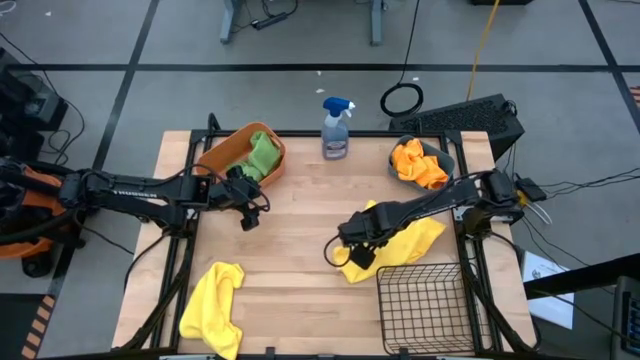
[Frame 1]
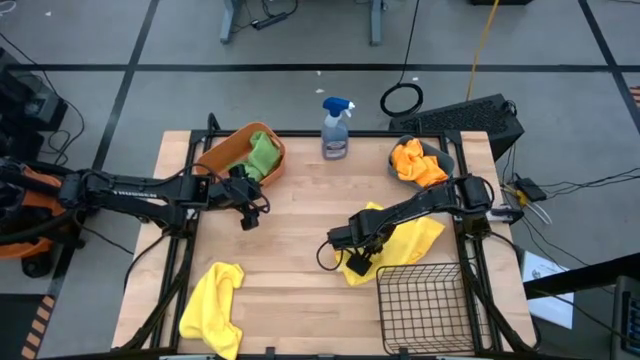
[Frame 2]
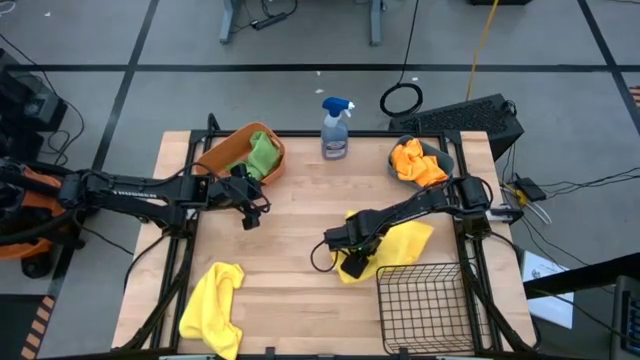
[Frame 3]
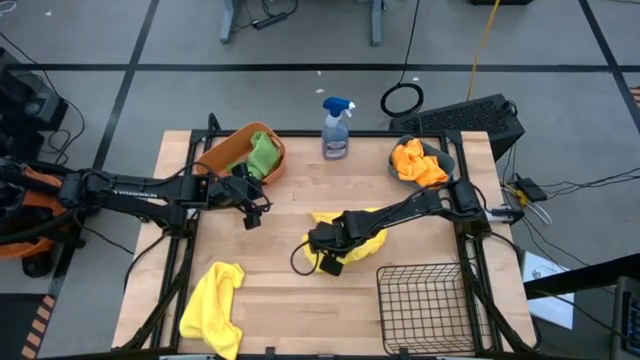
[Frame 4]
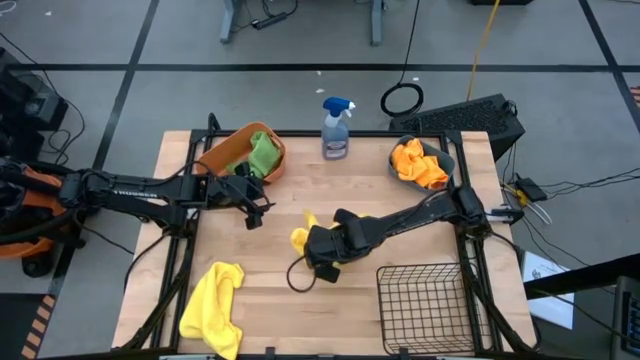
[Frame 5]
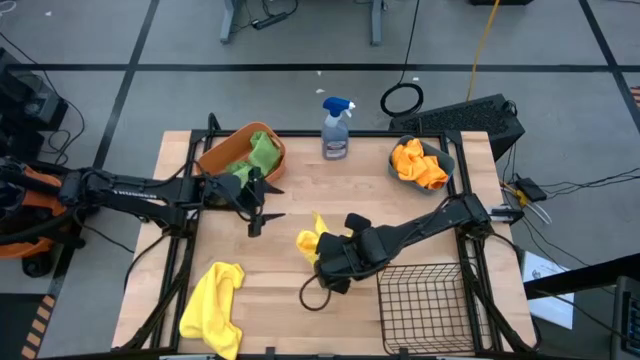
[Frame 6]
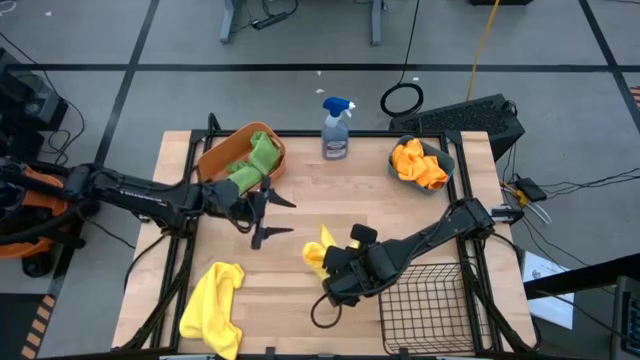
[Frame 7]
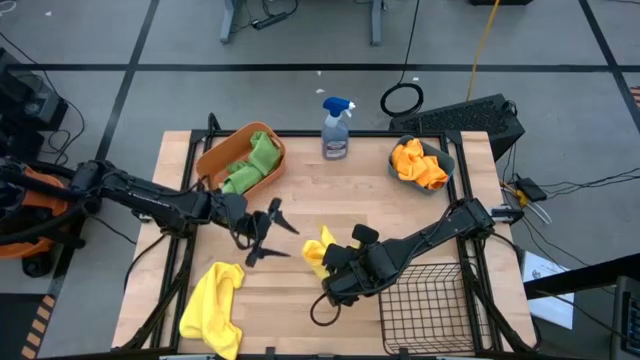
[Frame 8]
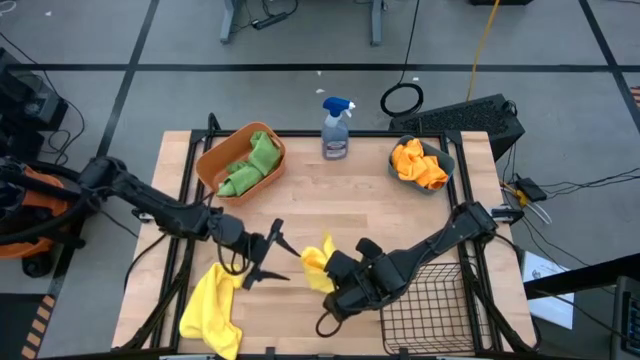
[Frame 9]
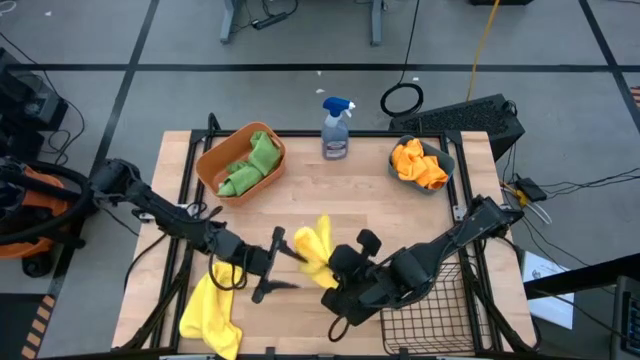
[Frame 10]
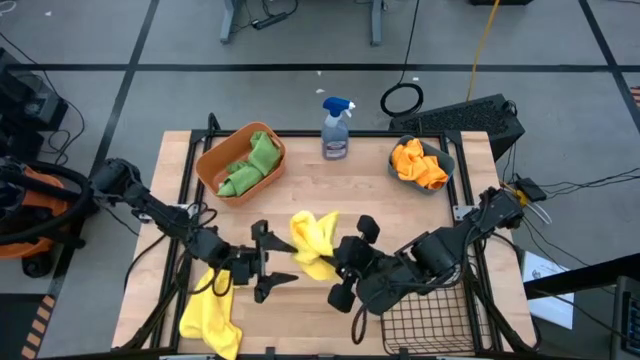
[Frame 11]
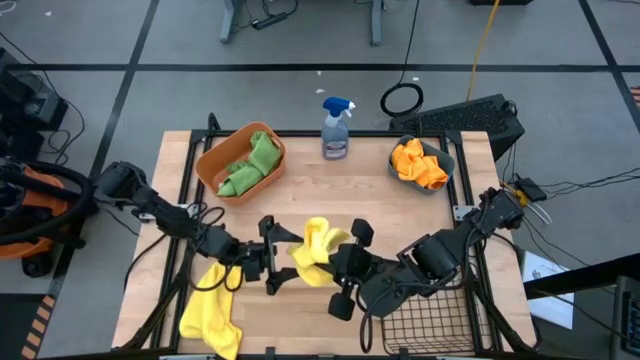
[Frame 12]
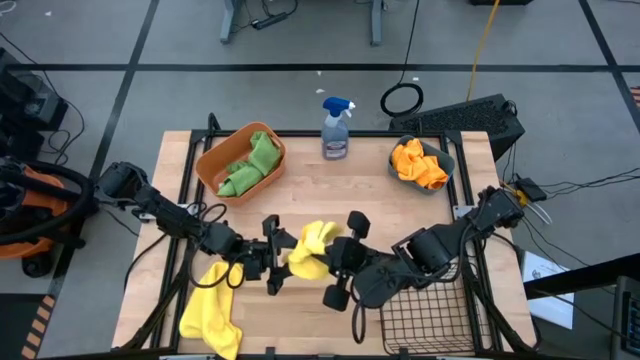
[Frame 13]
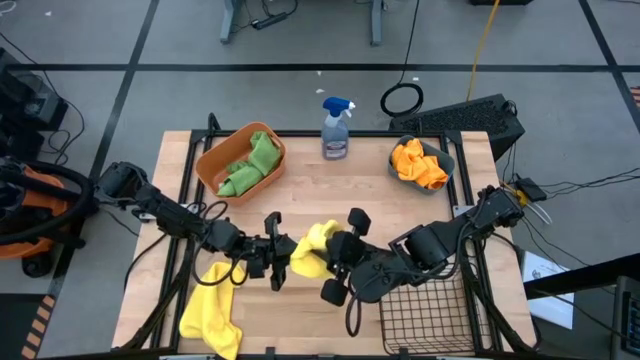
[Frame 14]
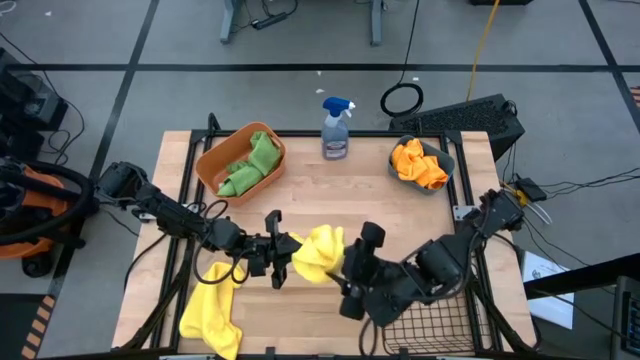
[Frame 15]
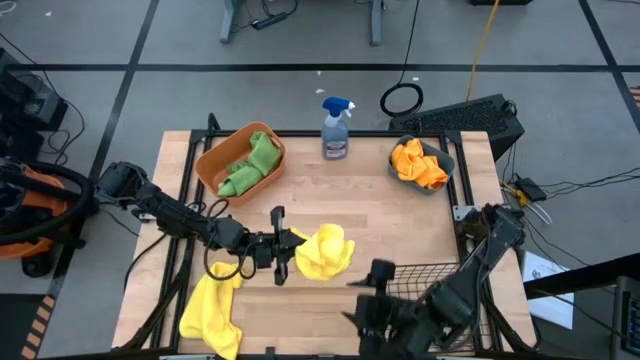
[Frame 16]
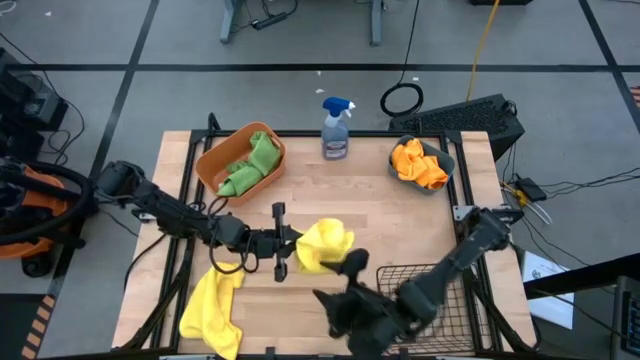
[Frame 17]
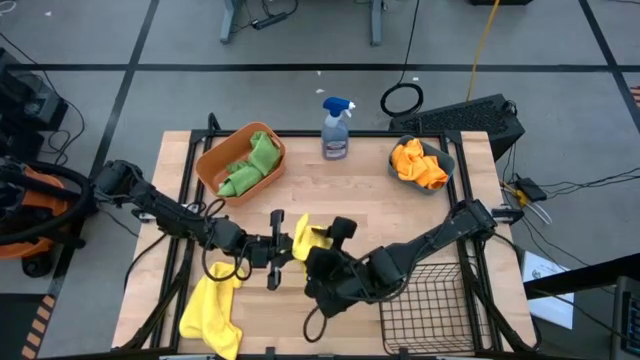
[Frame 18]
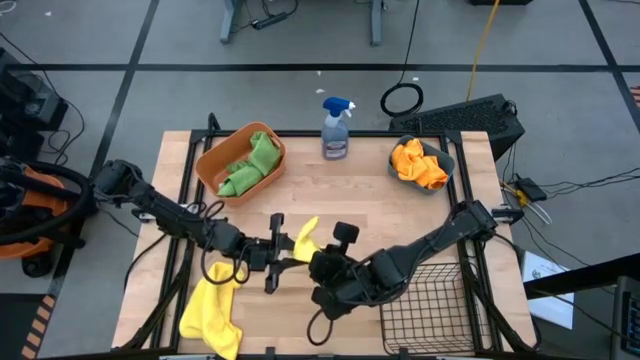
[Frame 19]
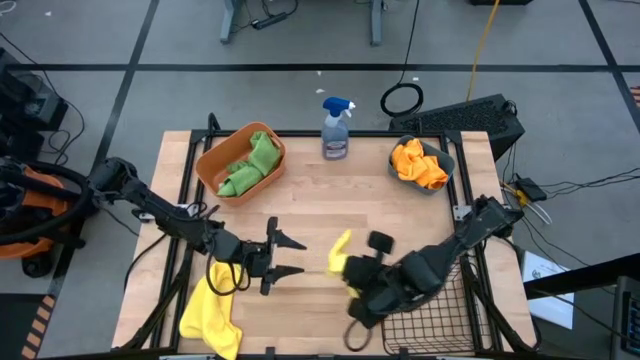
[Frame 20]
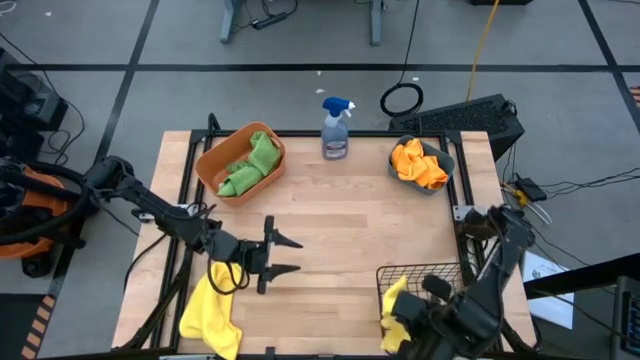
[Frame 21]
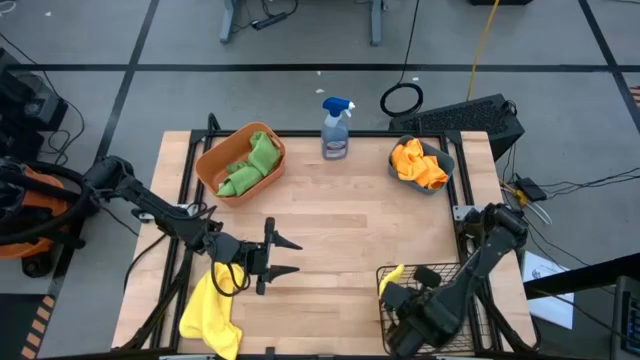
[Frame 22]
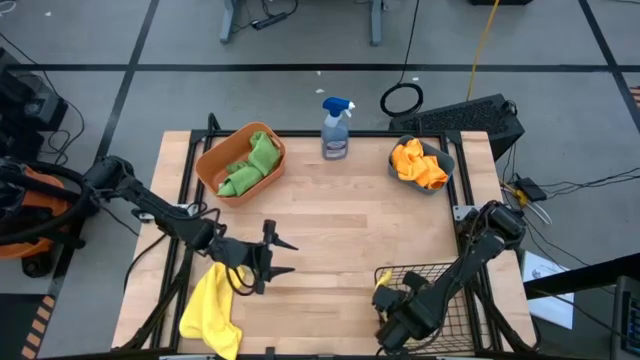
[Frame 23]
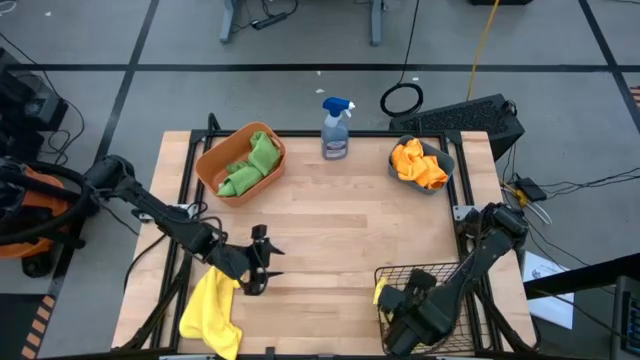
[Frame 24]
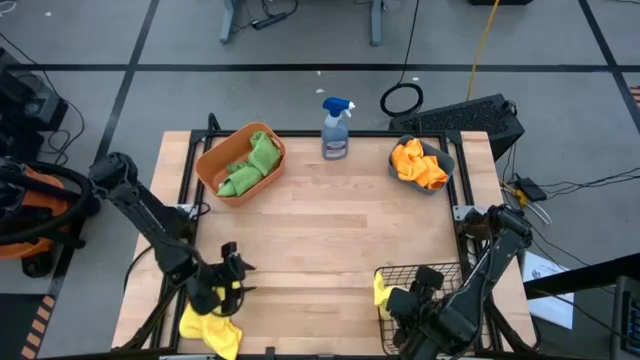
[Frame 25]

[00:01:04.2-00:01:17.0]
Task: Sort microfiber towel by color & place in baskets
Put the right yellow microfiber towel into the wire basket

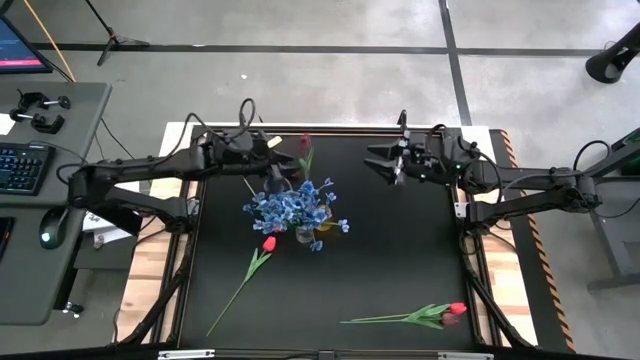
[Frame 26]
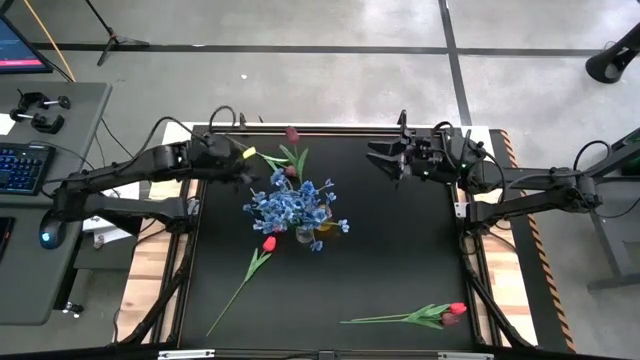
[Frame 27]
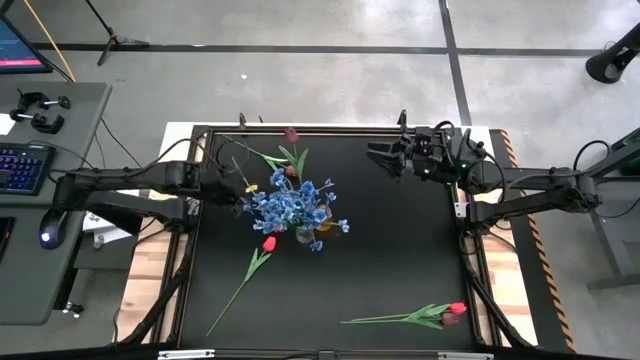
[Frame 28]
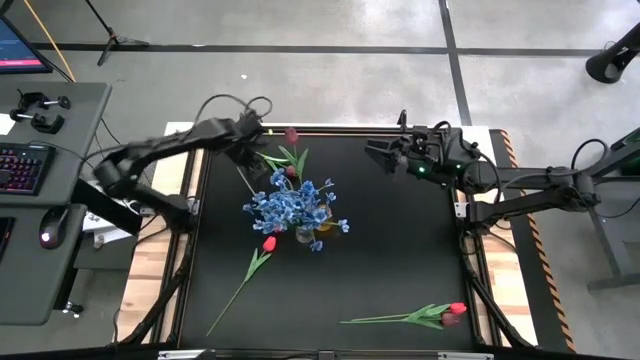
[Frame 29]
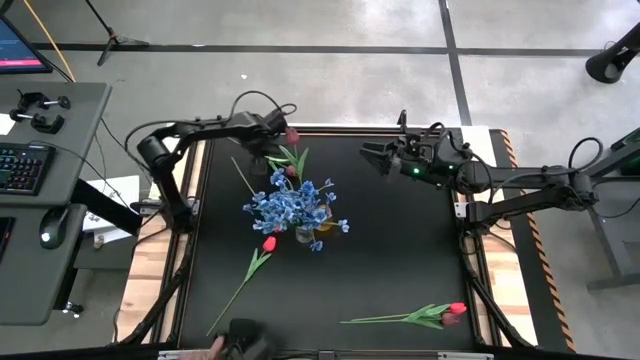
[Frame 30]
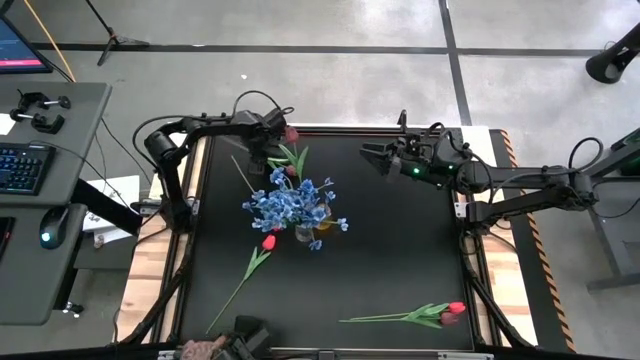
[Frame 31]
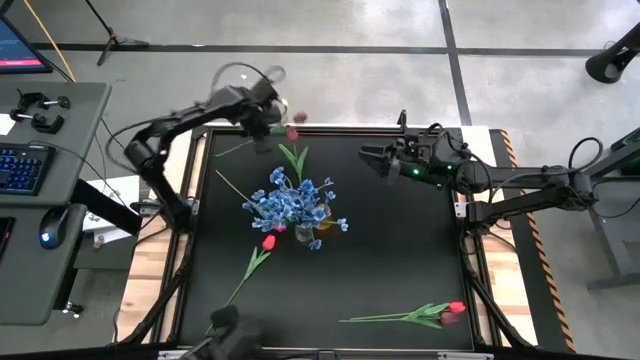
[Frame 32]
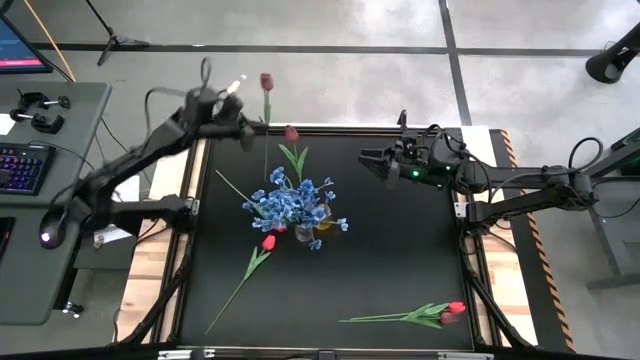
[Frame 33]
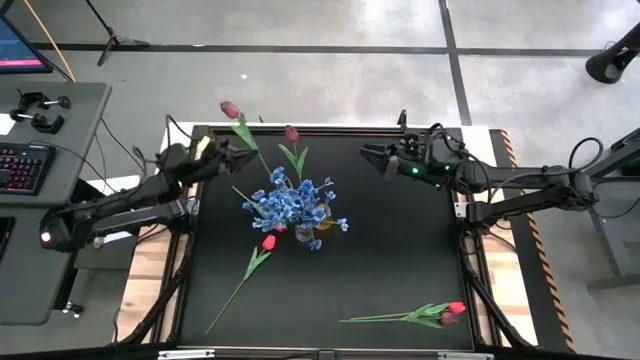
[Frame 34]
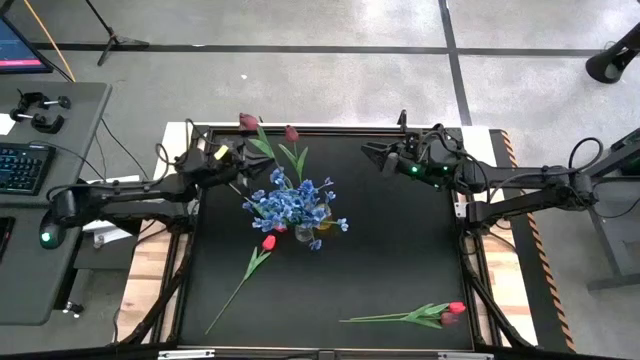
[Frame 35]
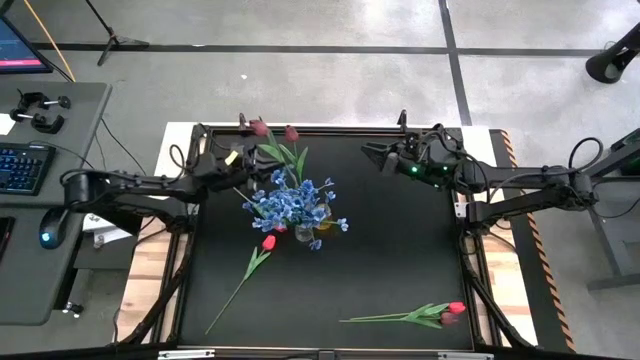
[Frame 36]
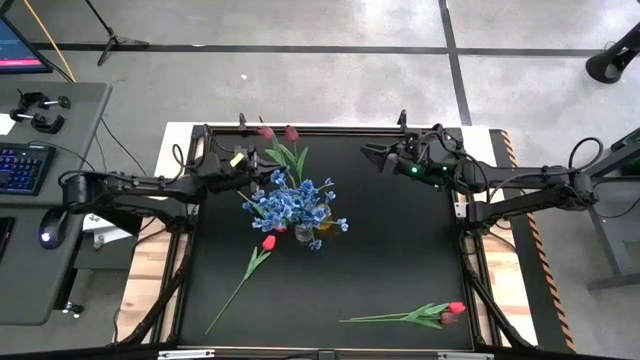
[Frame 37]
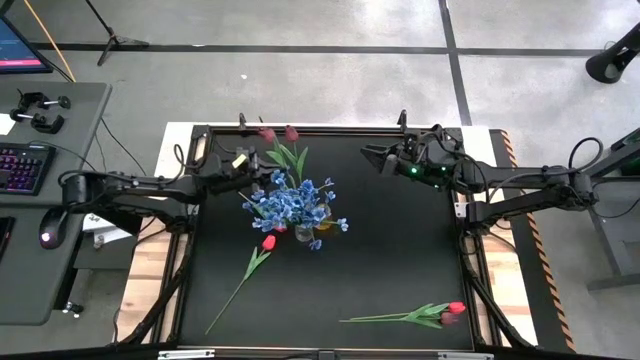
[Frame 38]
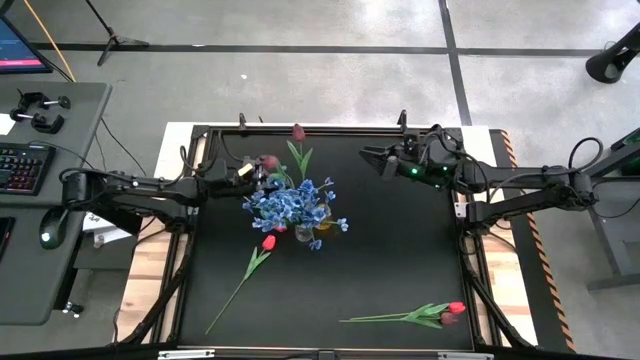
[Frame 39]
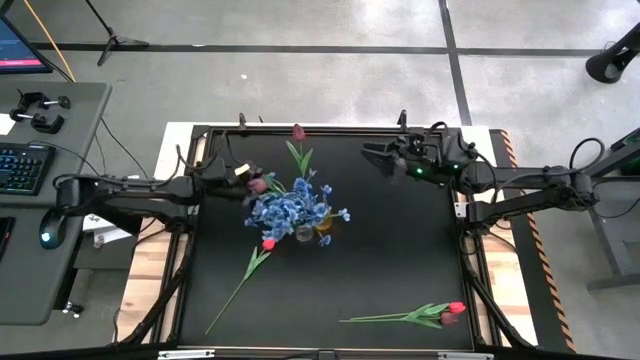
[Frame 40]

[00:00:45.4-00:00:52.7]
Task: Sort flowers into vase by color
Put the top dark red flower into the pink vase

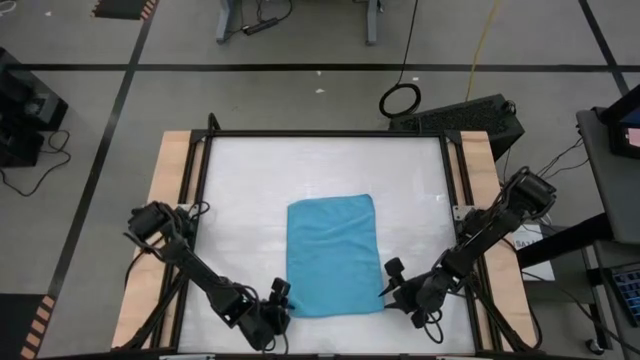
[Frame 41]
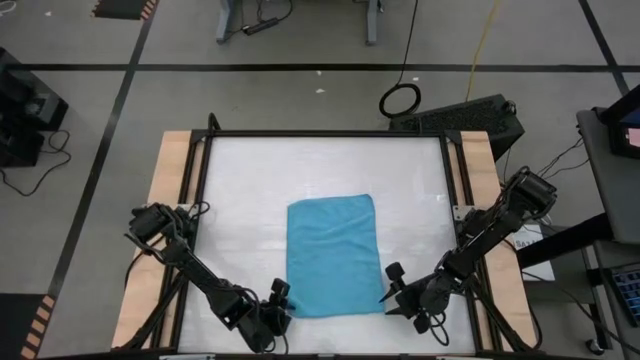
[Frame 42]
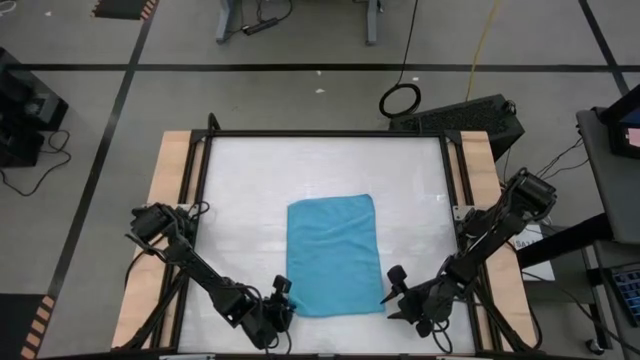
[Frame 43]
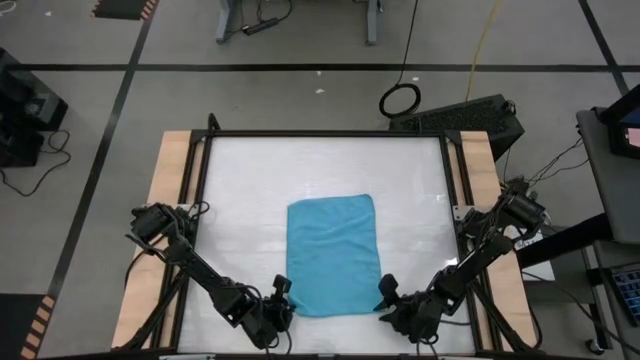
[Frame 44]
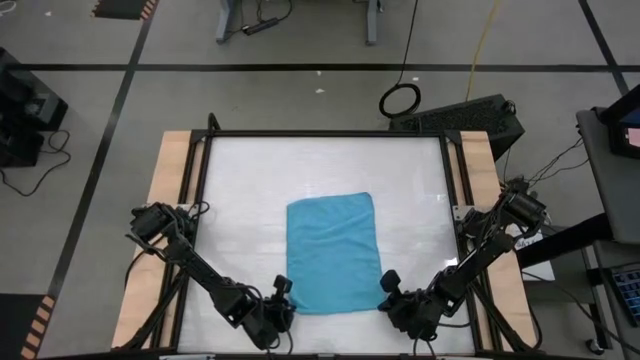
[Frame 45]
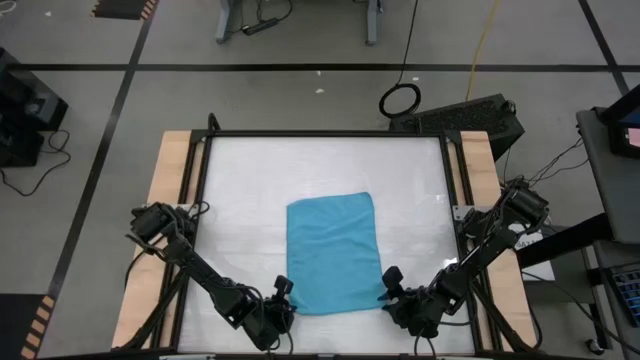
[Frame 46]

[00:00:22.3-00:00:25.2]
Task: Roll towel
Fold the blue microfiber towel
